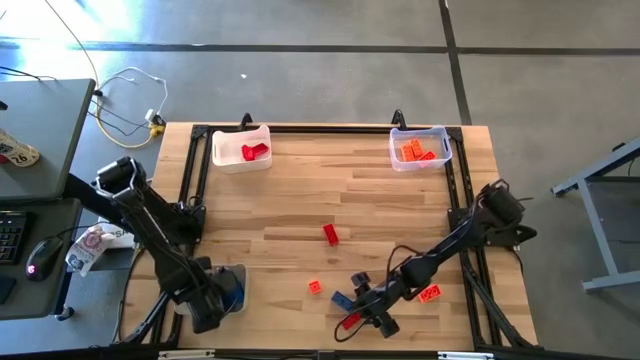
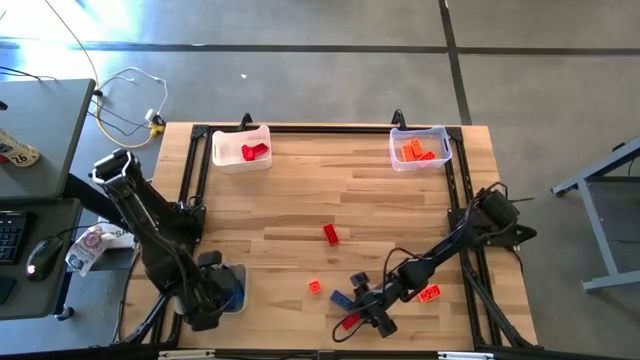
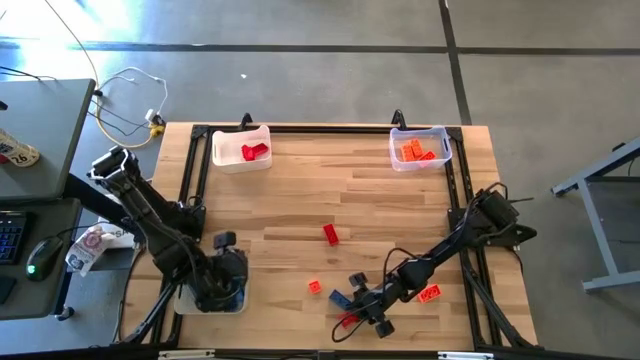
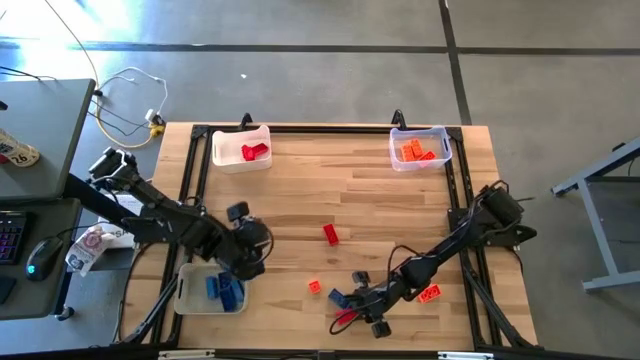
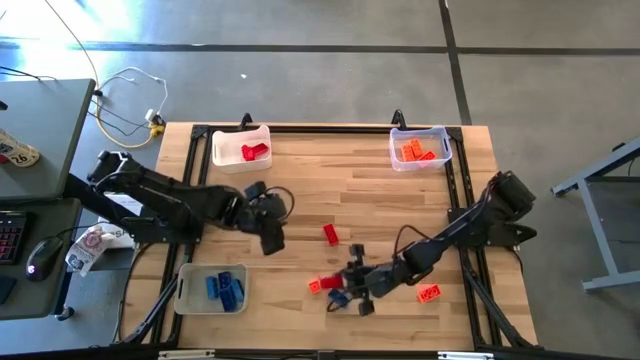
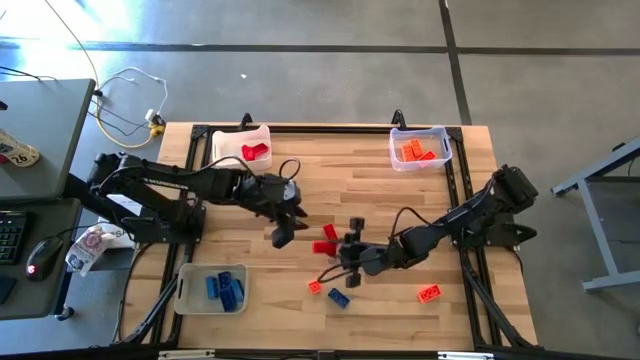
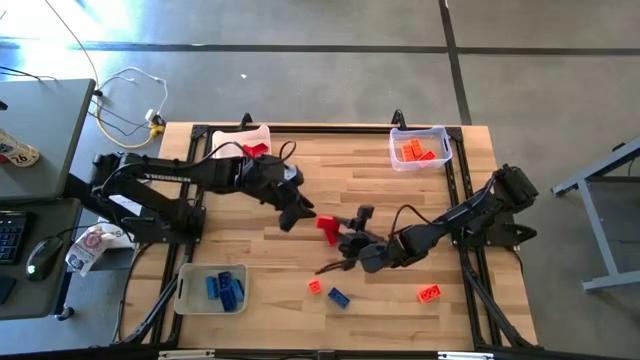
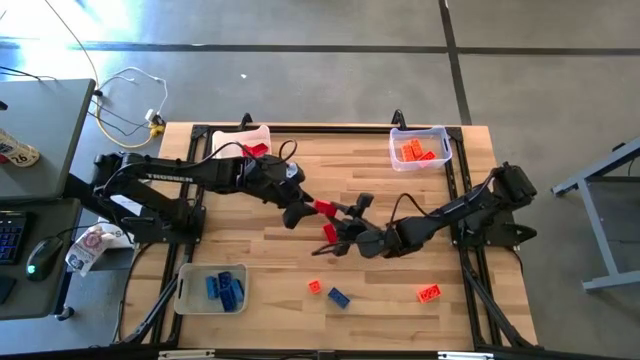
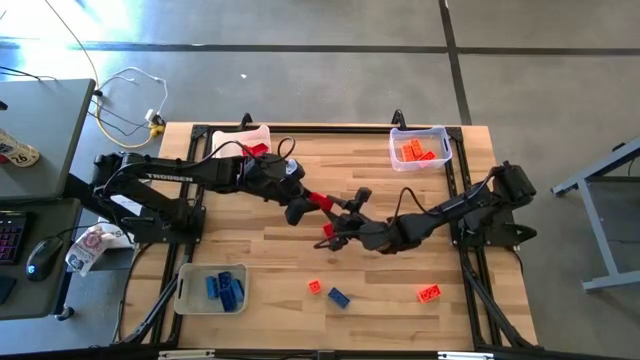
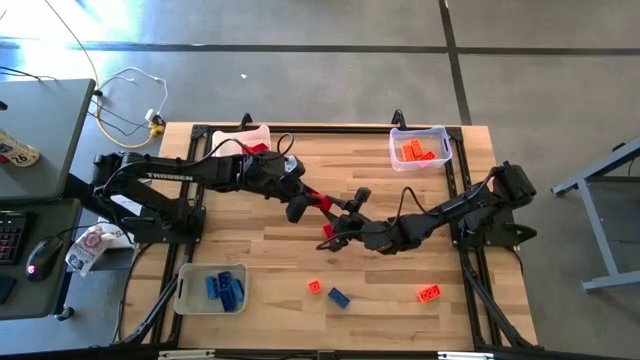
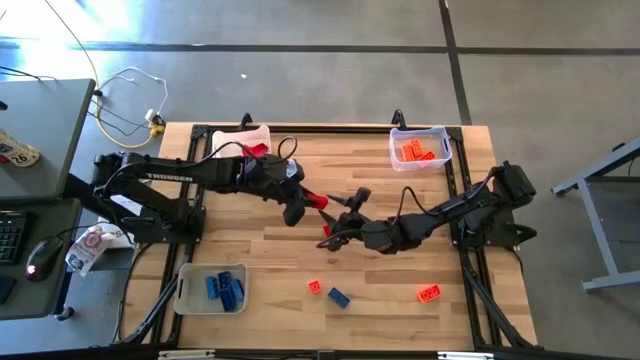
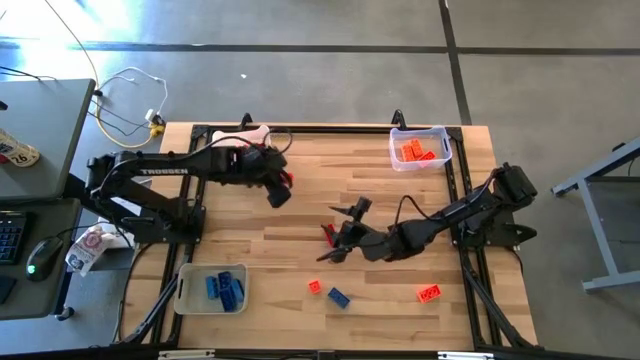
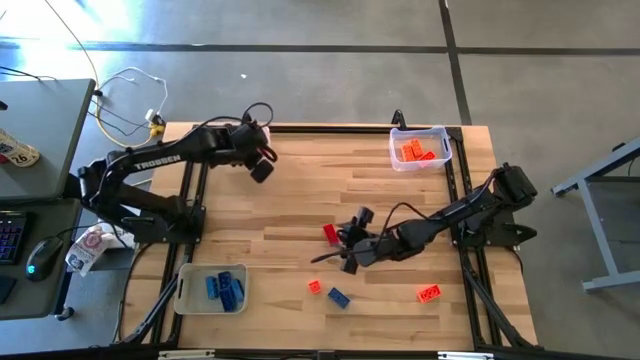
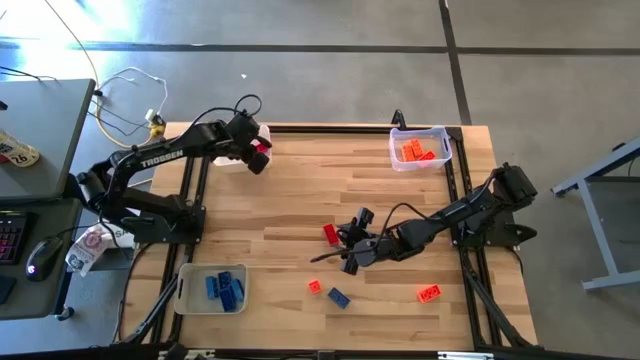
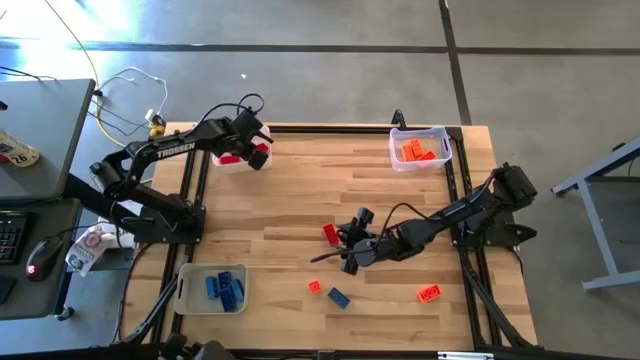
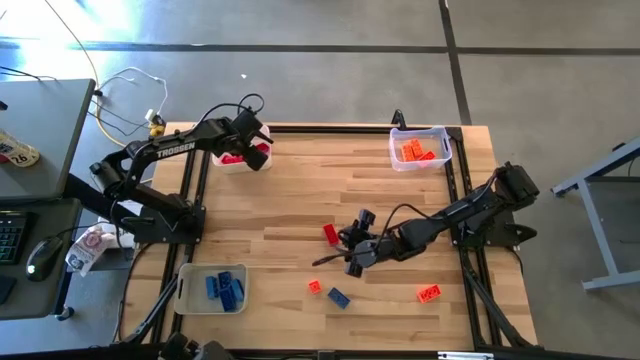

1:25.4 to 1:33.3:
Task: Sort & place blocks by color
Put the red game piece into the white bin

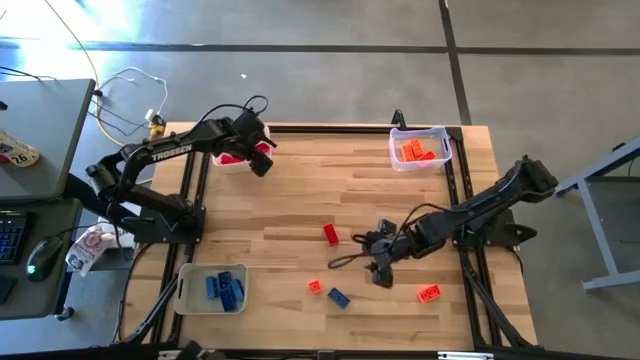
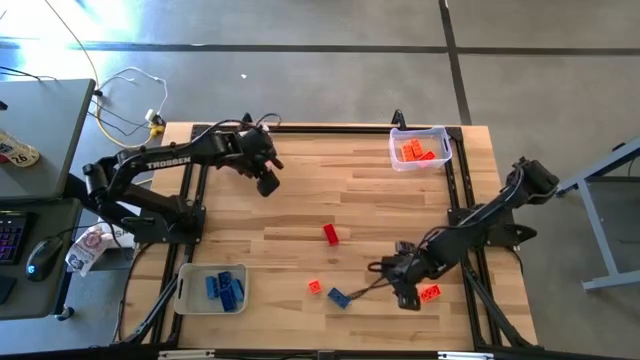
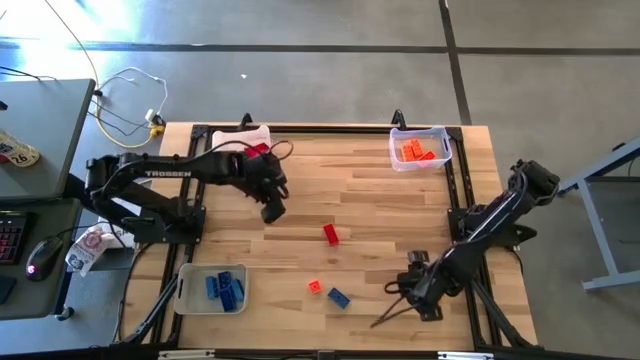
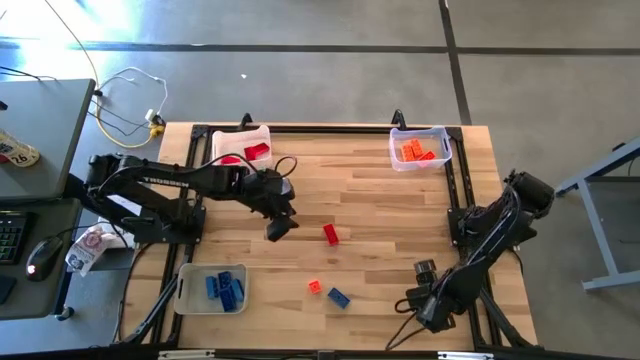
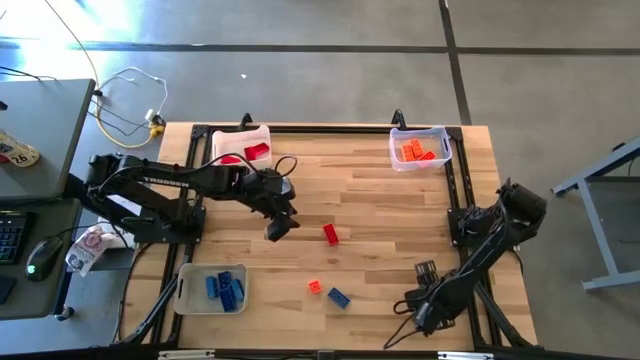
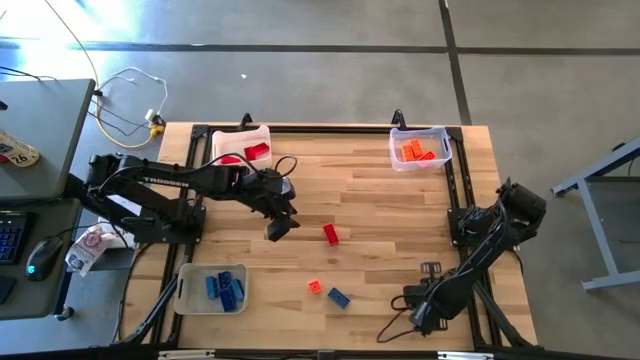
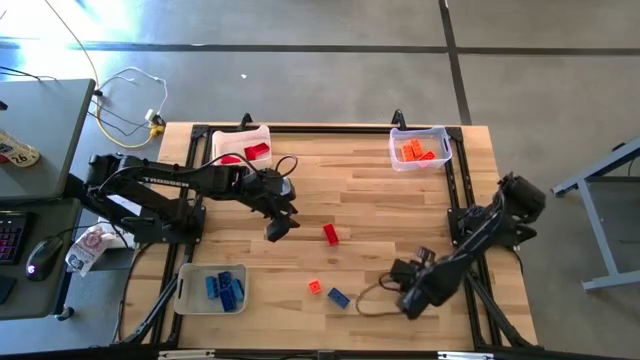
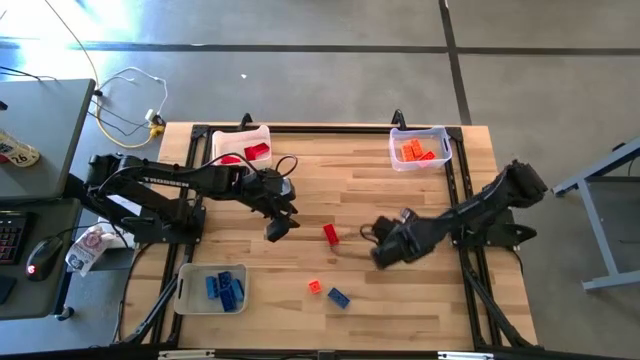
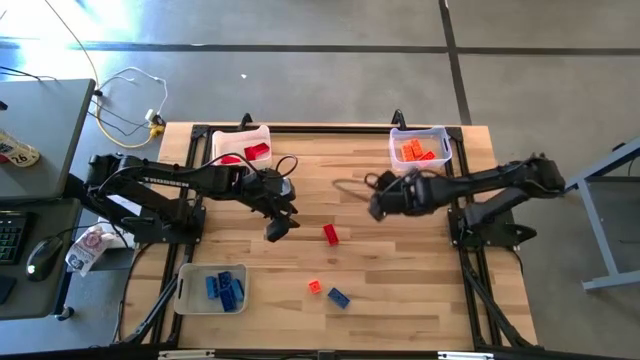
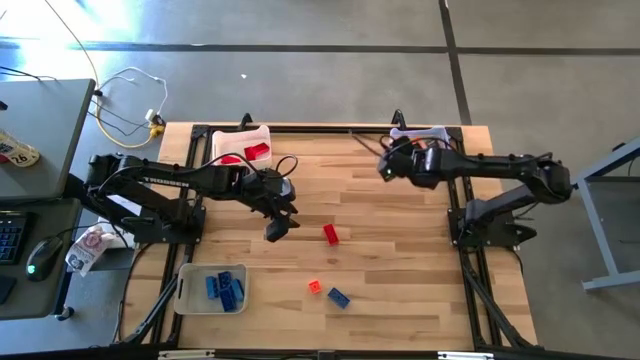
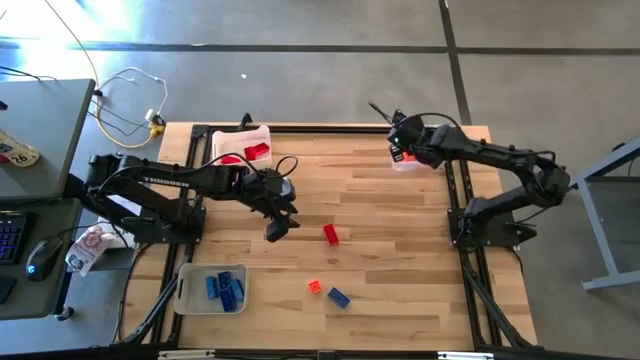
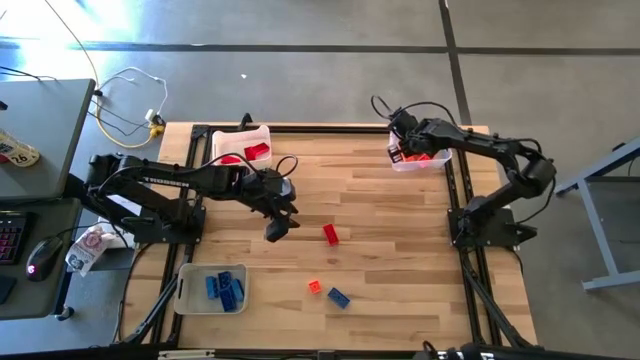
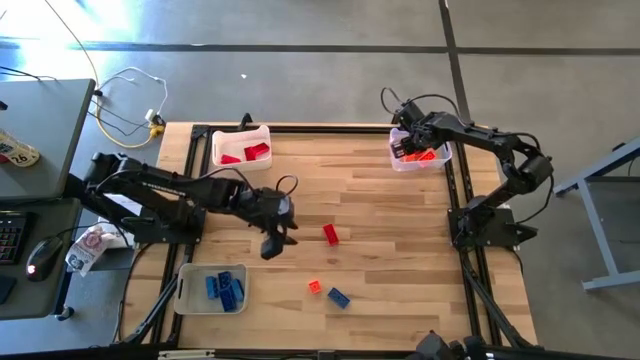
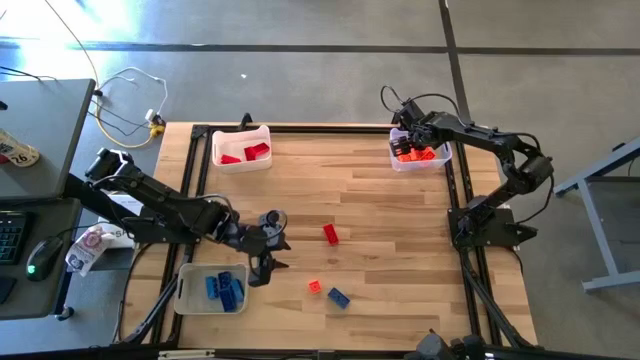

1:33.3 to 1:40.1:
Put the orange game piece into the transparent bin

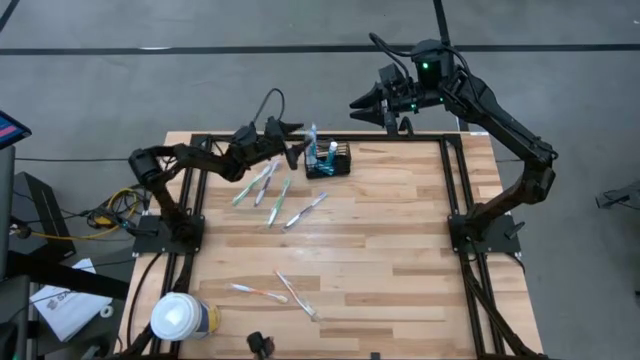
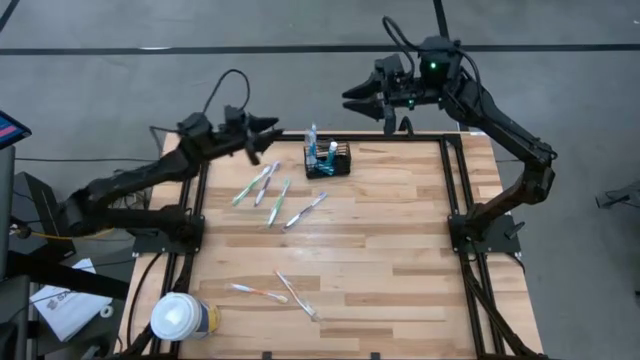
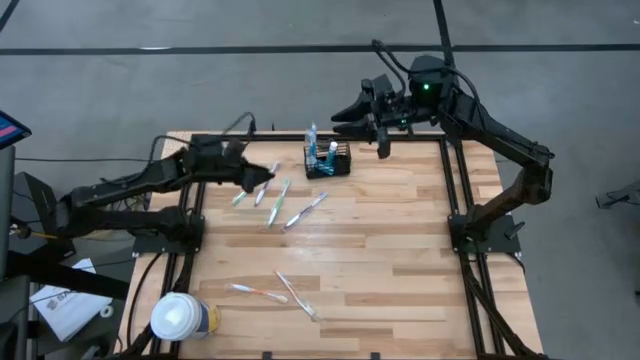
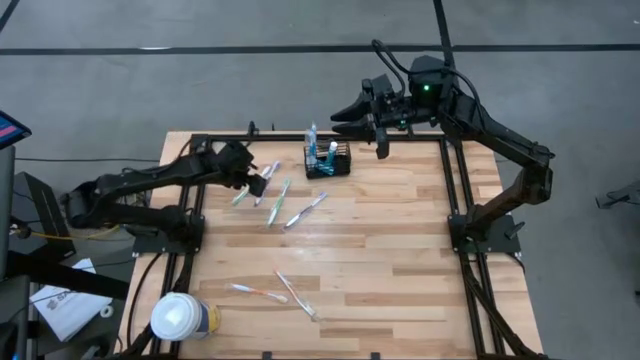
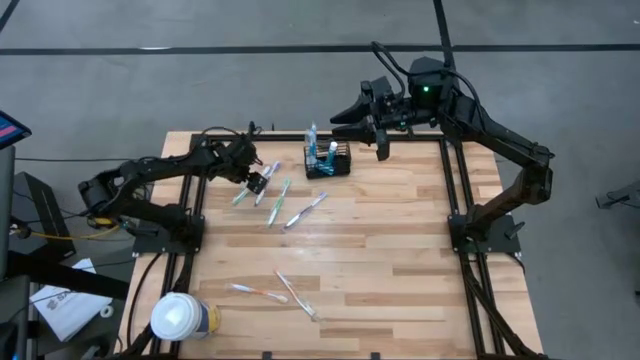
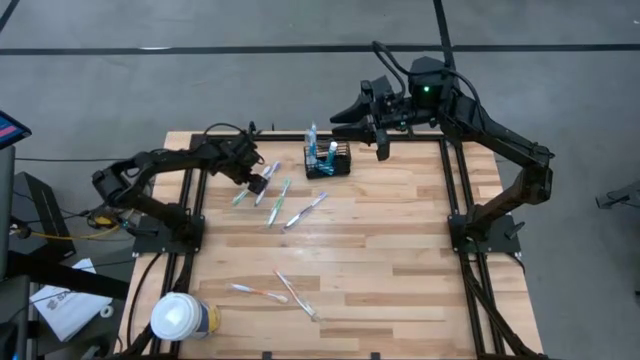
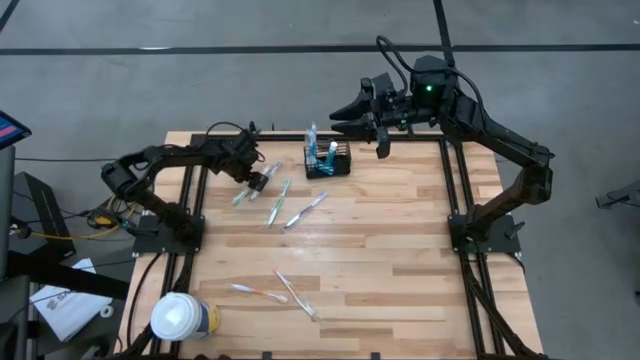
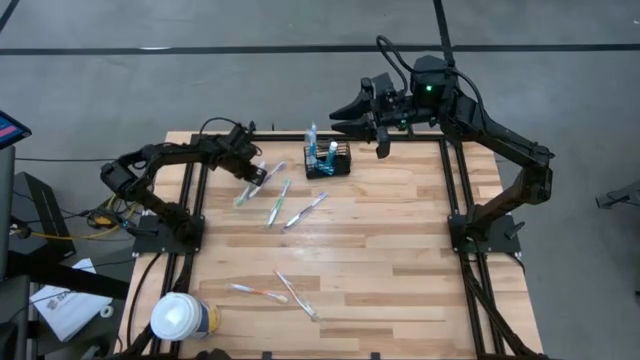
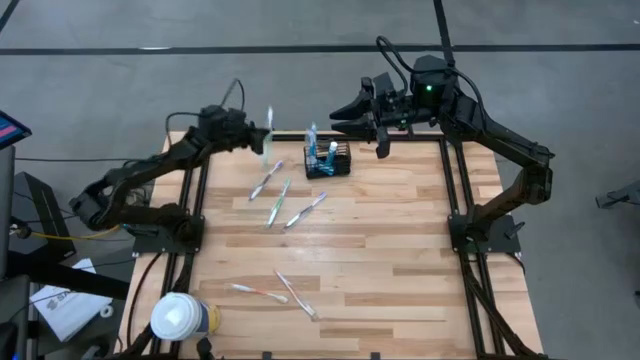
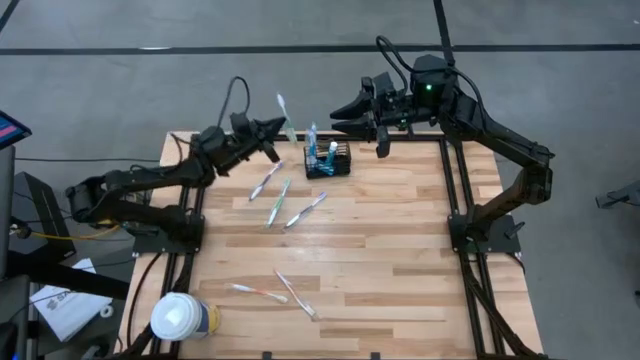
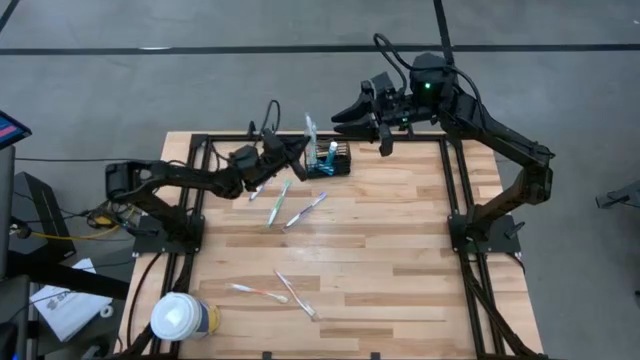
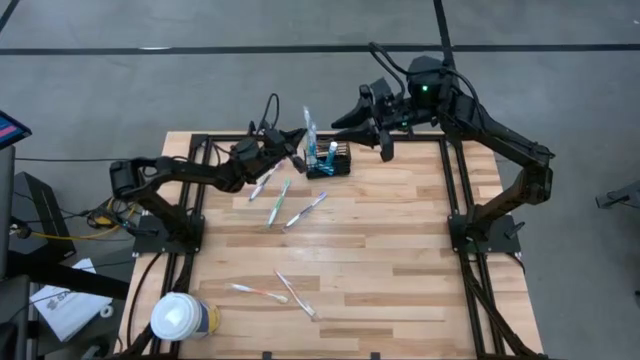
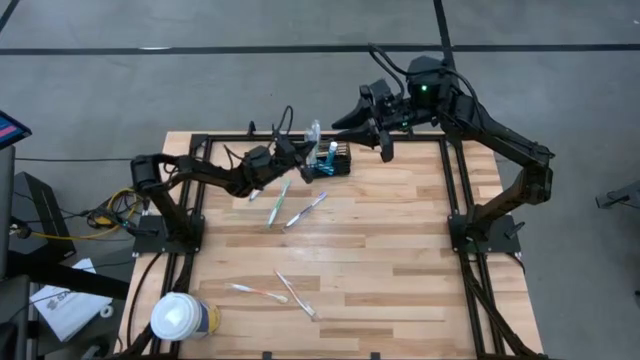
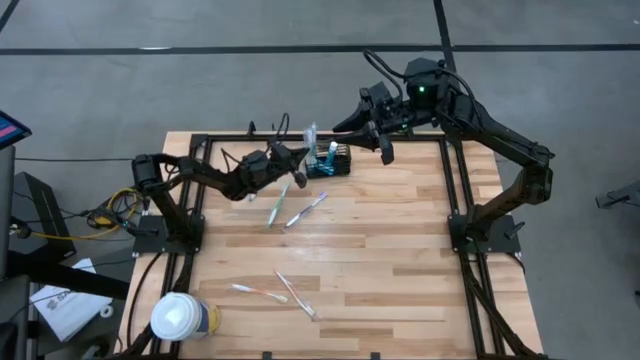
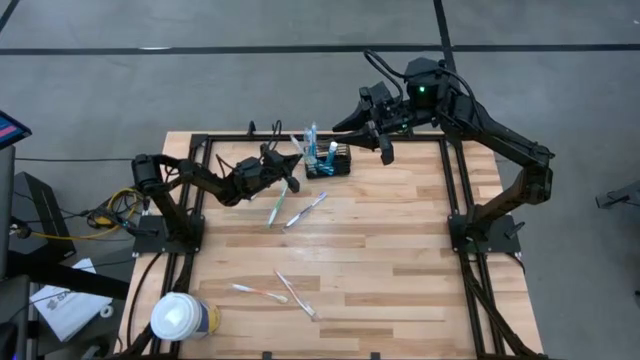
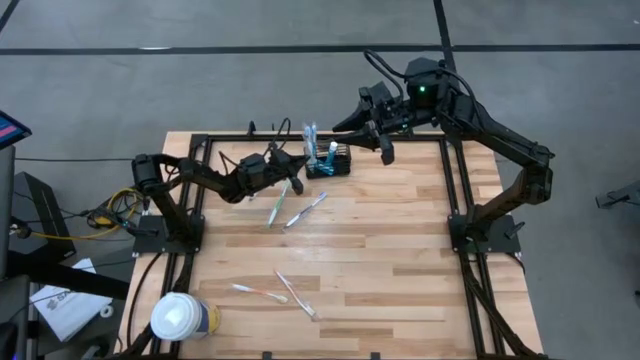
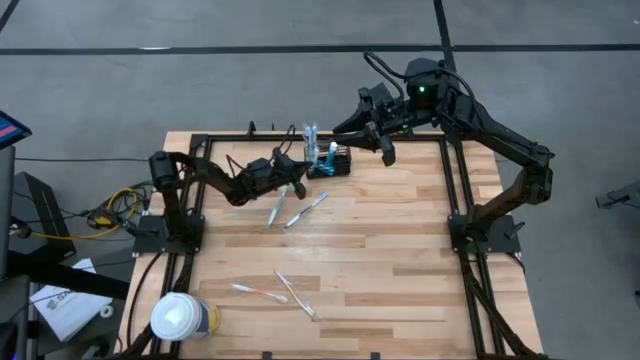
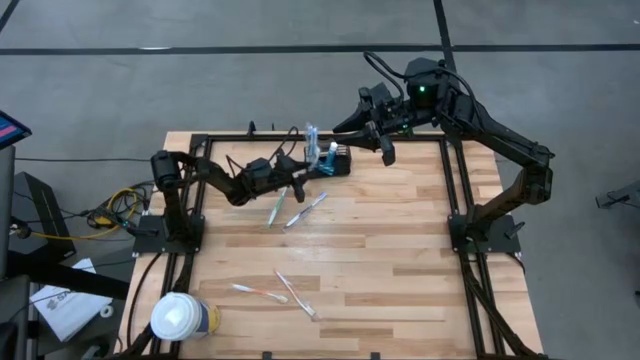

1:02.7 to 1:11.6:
Task: Pick & Place toothbrushing station
Put the top green toothbrush into the black wire organizer
